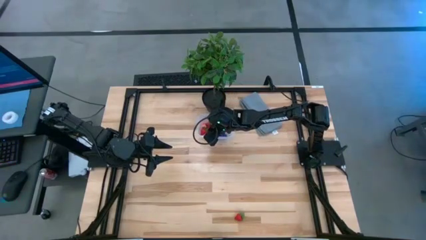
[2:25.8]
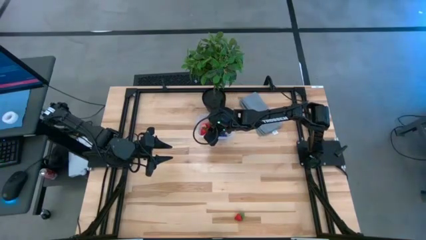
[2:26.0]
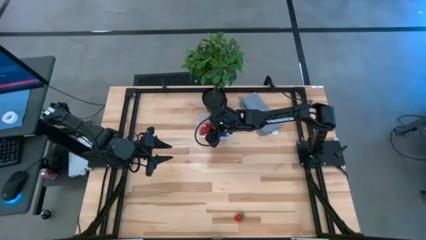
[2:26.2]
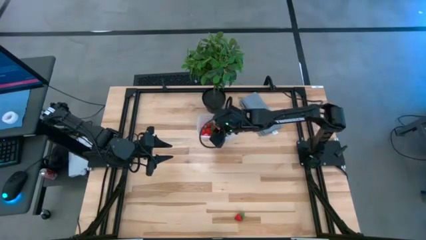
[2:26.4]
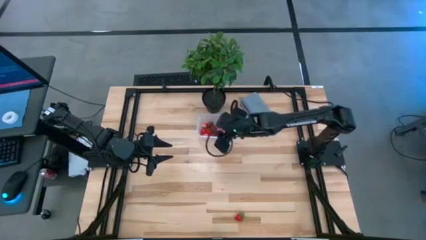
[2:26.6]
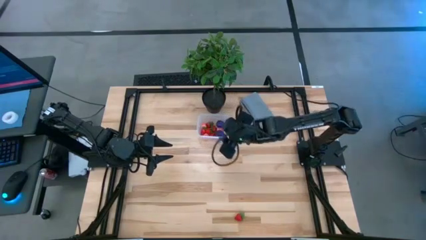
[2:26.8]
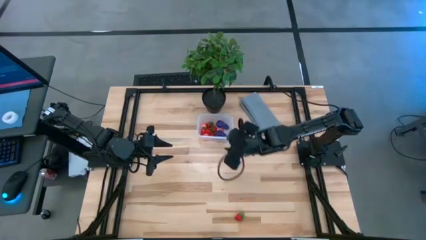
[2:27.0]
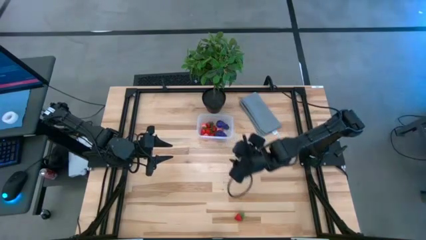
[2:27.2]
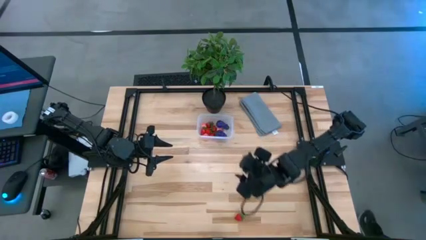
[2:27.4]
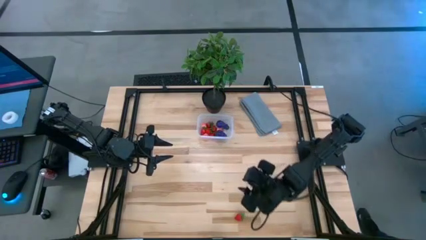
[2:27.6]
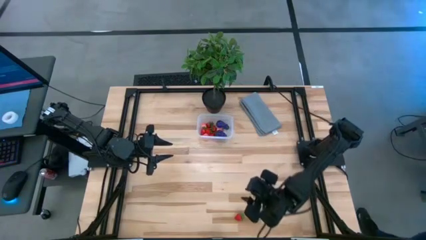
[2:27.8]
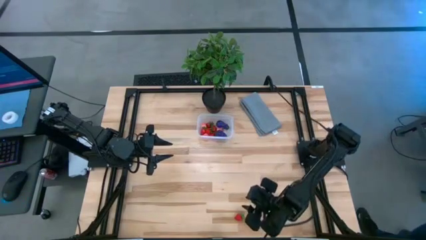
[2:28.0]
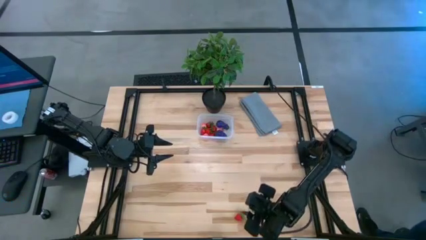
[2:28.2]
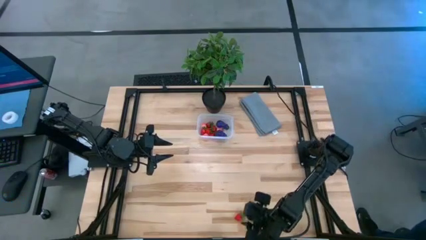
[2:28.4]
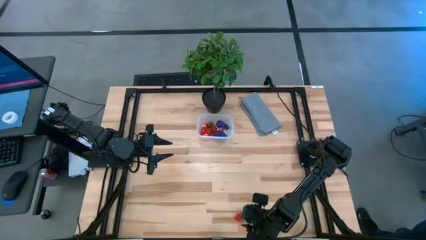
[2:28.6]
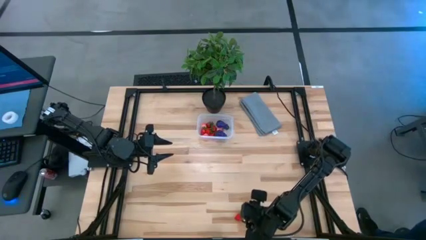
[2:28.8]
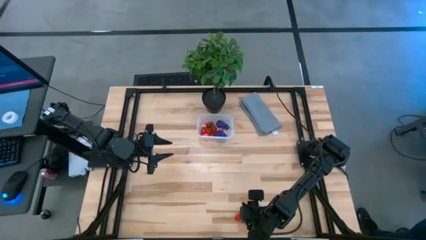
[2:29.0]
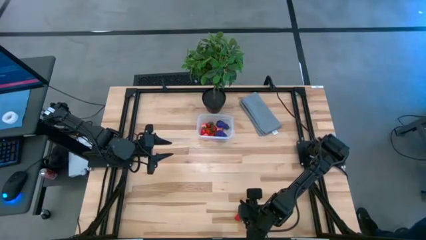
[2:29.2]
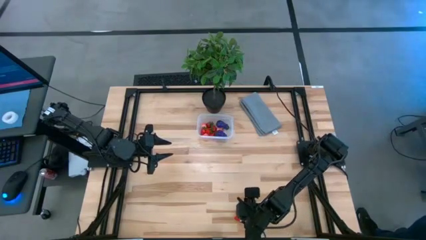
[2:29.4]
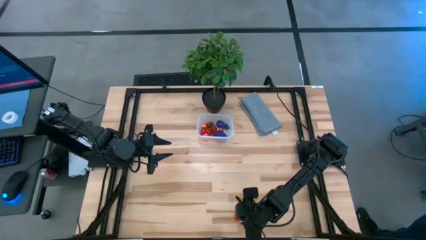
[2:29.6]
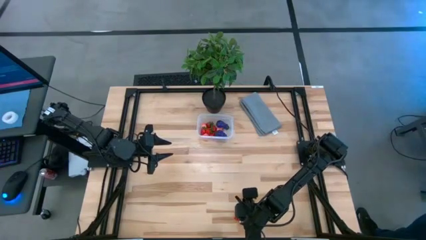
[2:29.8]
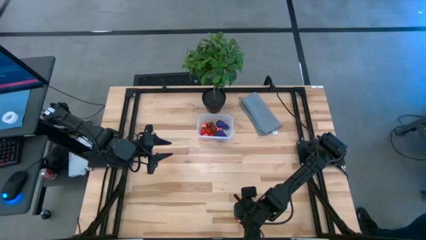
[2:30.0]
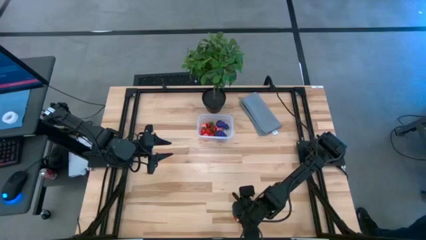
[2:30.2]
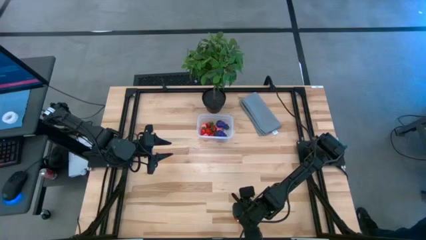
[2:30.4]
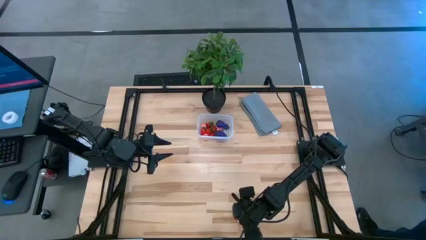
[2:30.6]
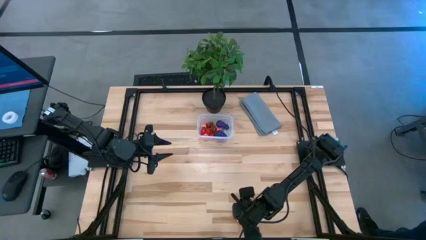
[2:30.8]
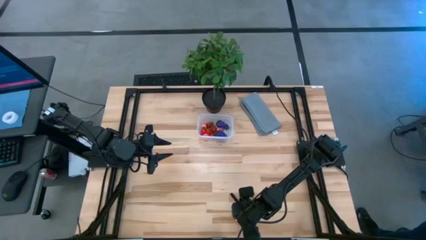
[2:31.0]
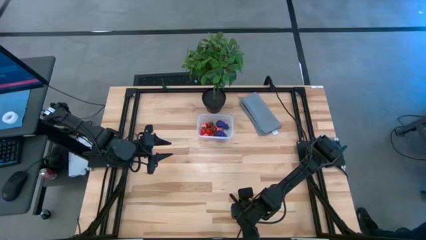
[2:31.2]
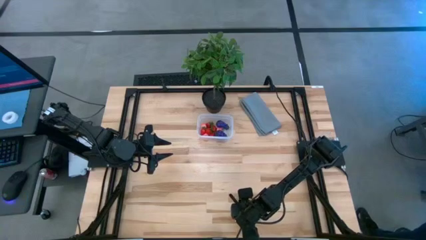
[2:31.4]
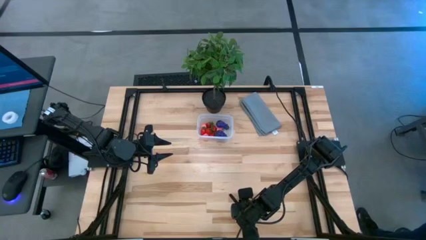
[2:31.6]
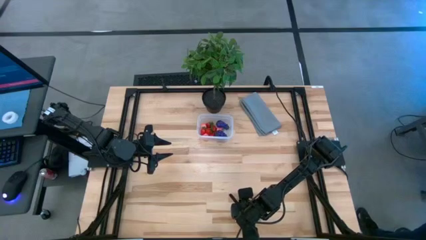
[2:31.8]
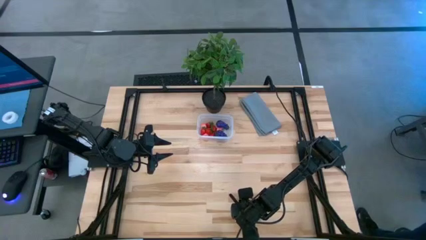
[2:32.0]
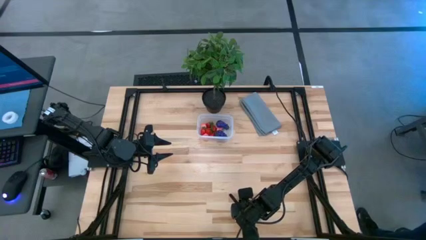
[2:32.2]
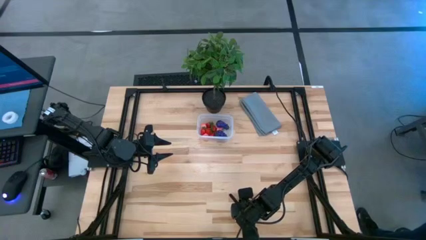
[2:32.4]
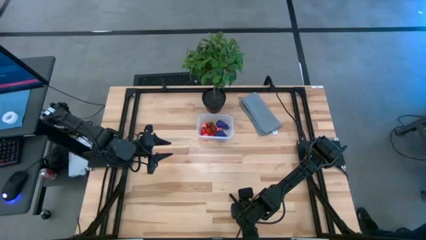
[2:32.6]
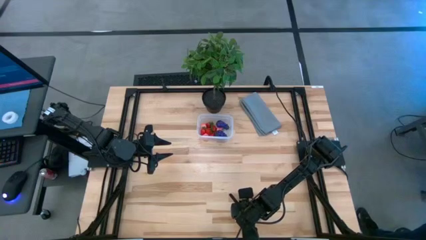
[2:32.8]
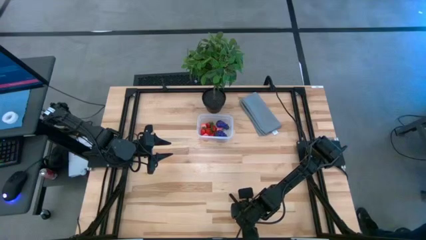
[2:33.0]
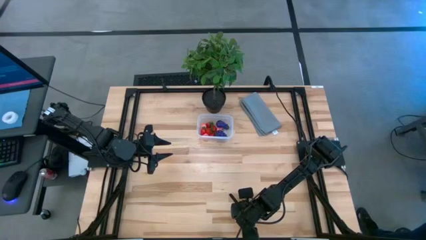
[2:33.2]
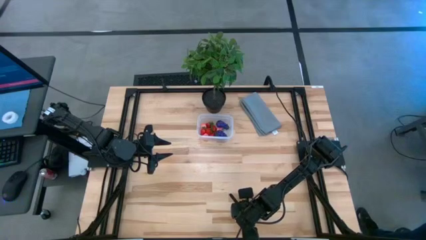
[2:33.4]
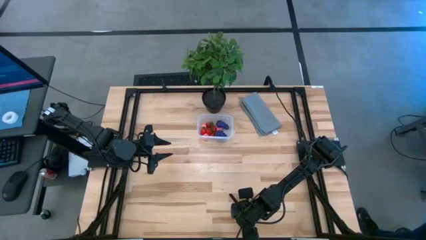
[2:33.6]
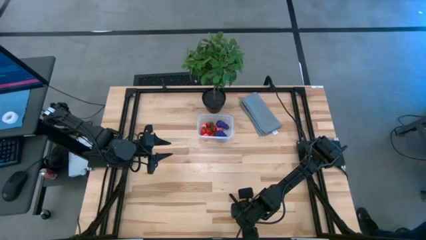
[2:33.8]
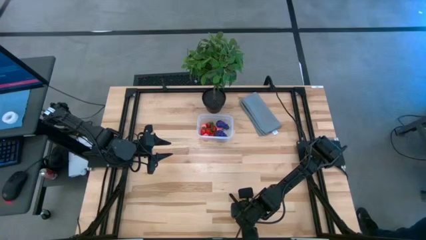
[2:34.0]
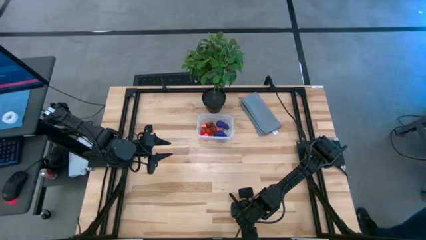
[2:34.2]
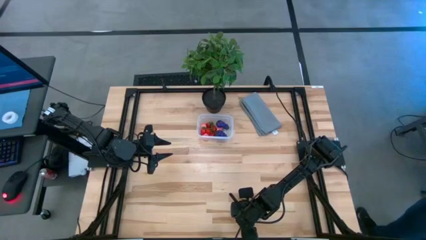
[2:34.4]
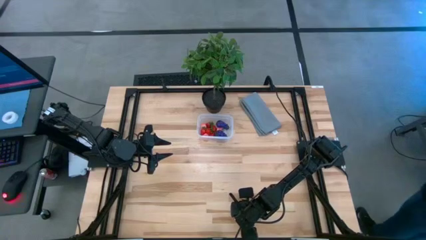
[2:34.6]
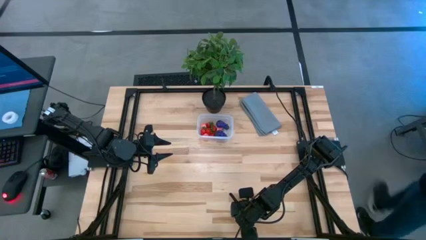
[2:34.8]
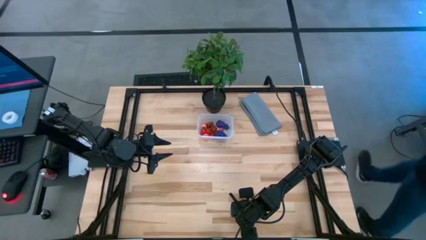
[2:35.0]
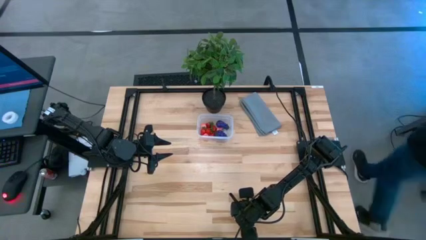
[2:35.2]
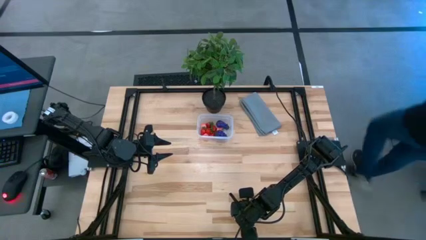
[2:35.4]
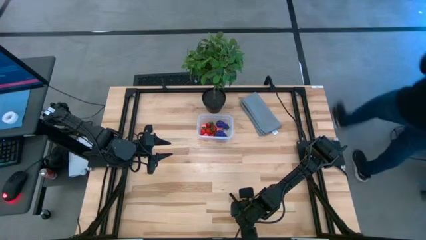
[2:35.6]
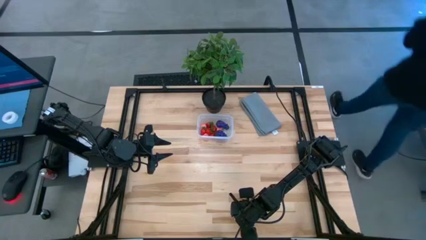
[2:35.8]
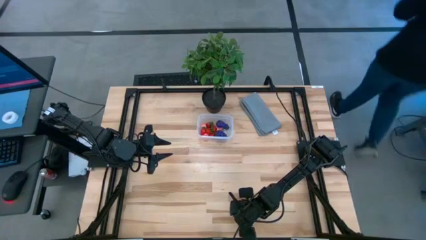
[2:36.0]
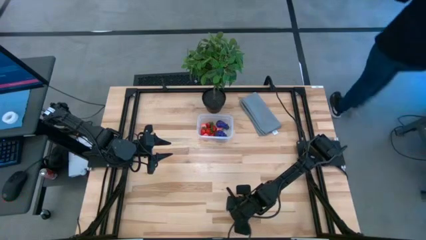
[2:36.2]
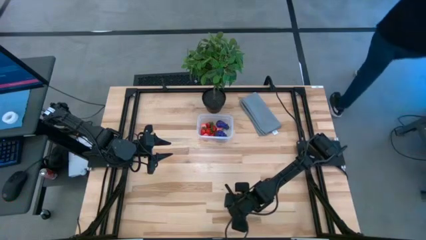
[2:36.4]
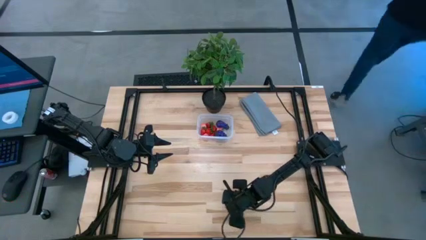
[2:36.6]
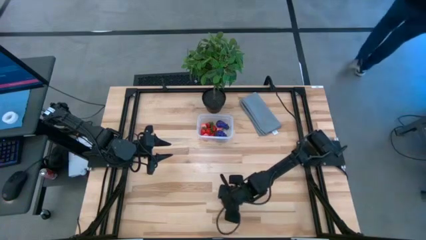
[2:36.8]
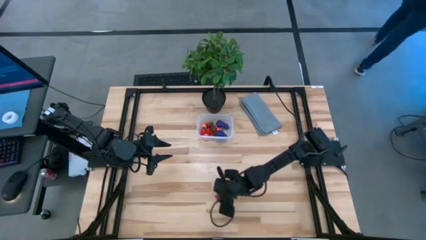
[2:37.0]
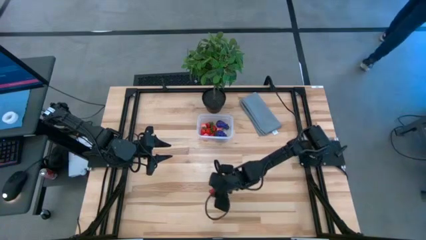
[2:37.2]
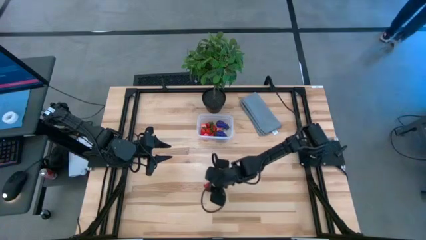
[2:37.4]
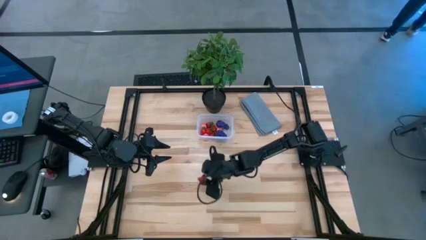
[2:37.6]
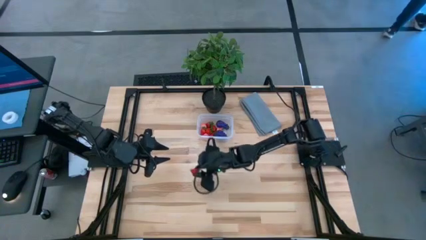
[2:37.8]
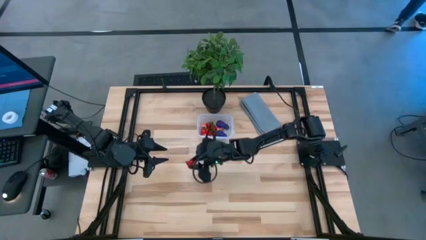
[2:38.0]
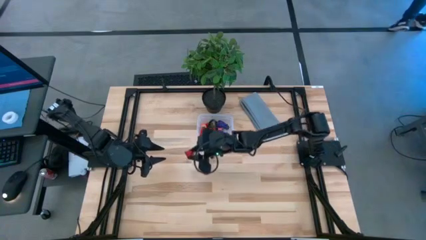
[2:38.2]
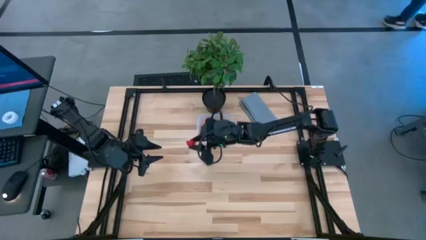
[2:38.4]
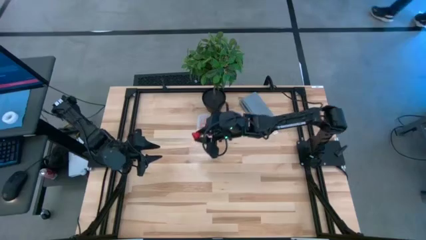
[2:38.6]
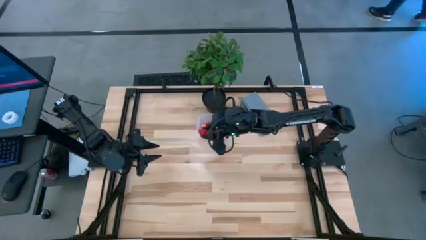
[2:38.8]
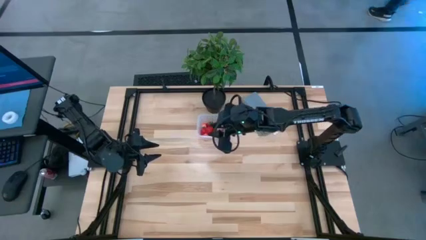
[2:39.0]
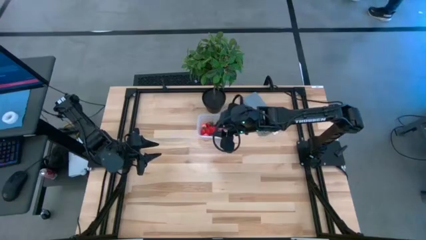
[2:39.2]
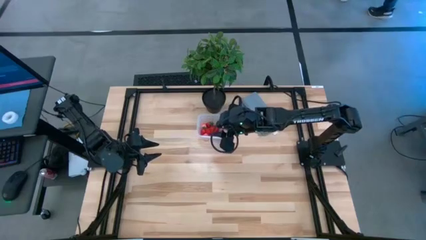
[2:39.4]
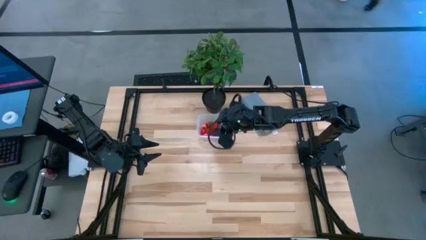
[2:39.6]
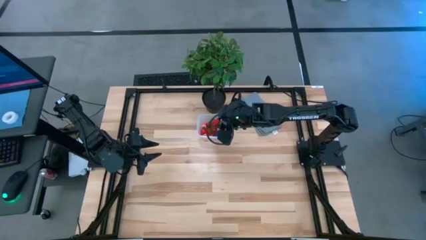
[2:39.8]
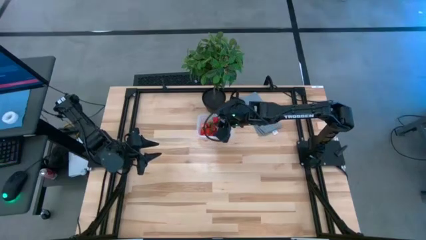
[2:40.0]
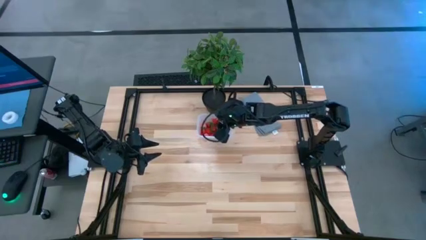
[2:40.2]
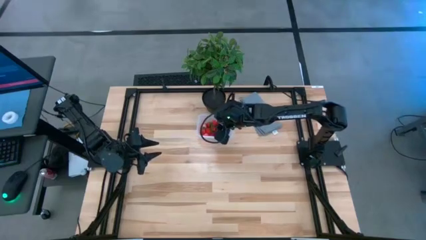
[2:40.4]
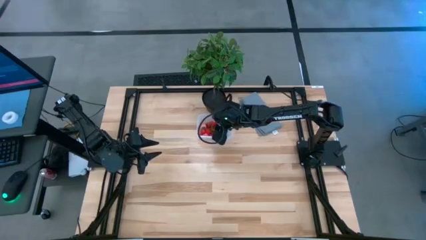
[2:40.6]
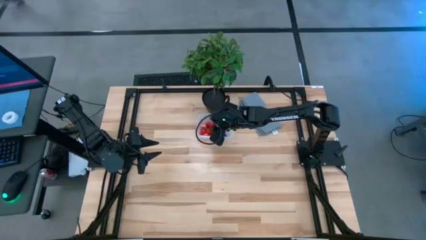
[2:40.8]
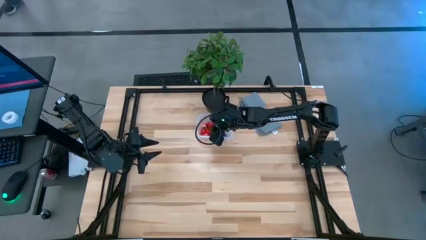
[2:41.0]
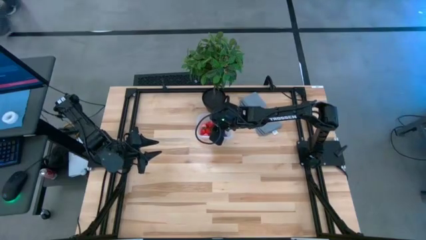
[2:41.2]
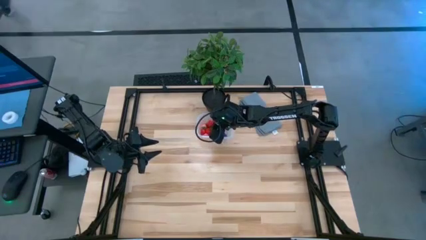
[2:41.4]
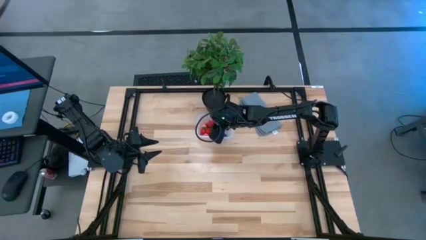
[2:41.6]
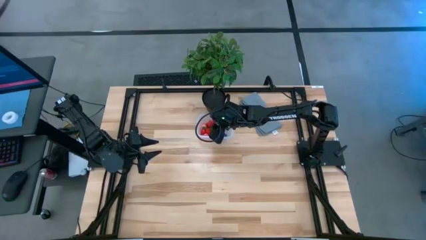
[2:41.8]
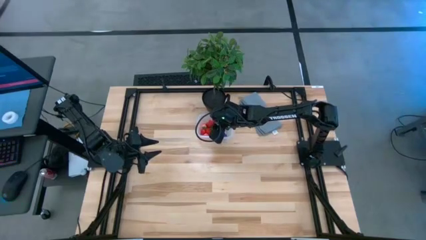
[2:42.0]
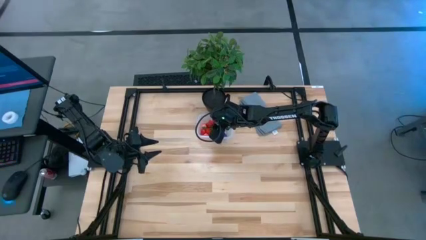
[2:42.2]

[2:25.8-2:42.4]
Task: Pick and placing Produce into tupperware
Put the red strawberry into the transparent bin
